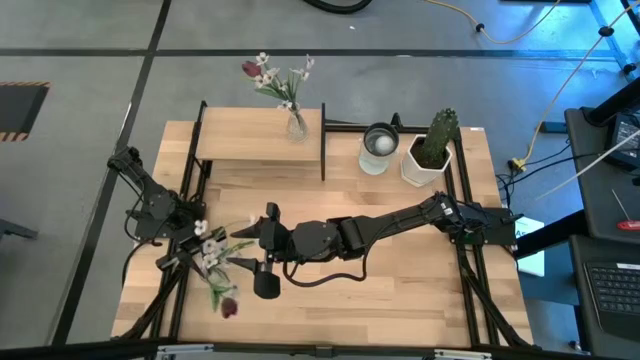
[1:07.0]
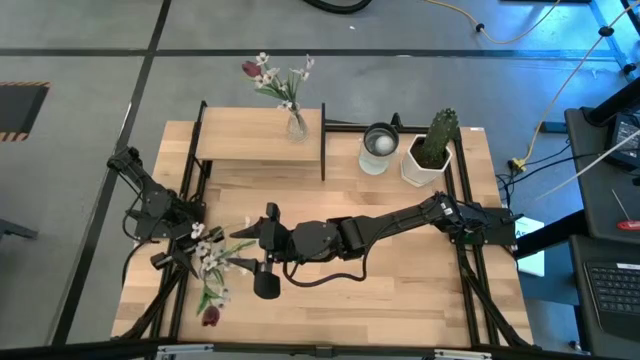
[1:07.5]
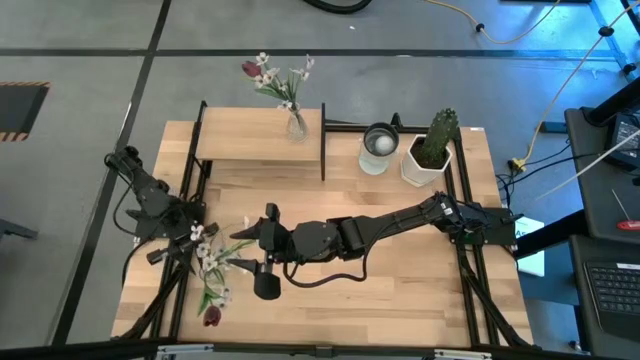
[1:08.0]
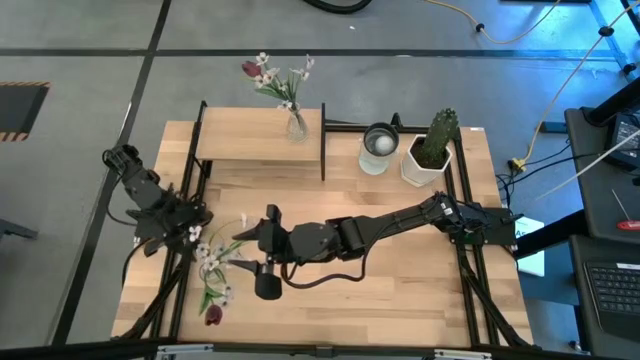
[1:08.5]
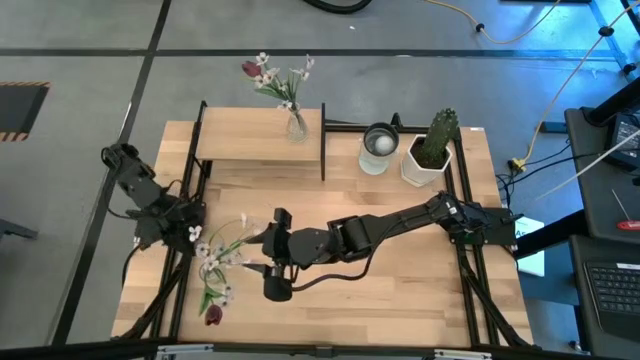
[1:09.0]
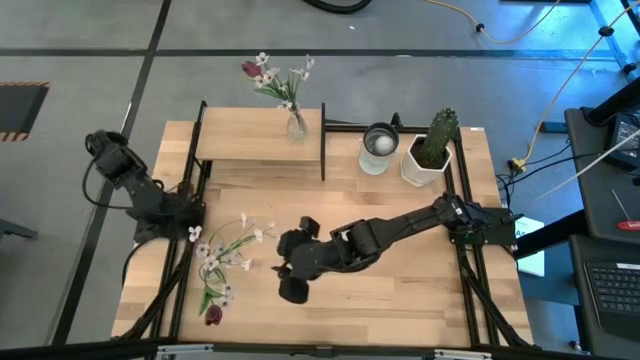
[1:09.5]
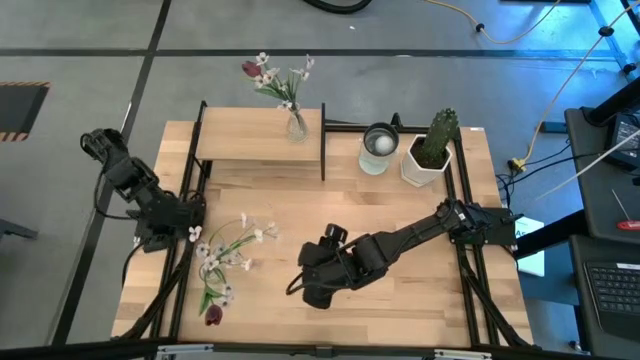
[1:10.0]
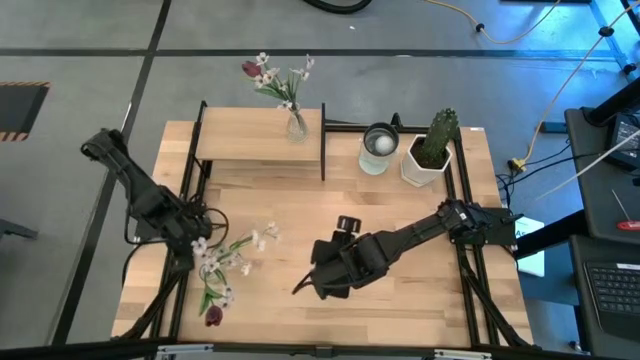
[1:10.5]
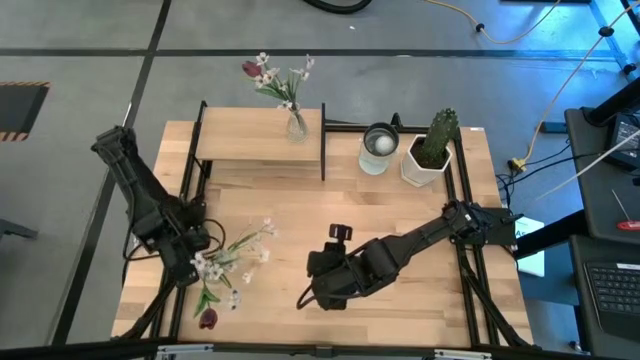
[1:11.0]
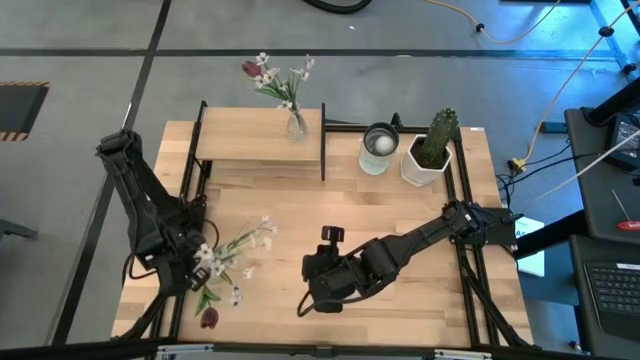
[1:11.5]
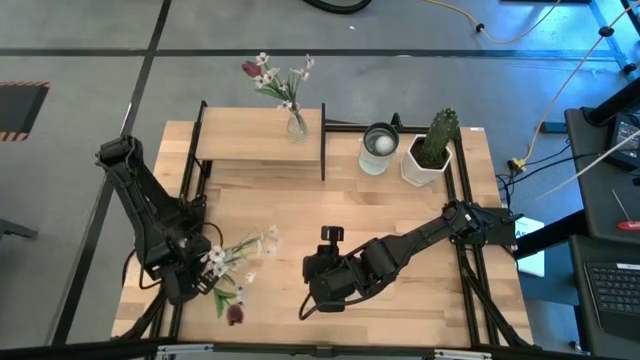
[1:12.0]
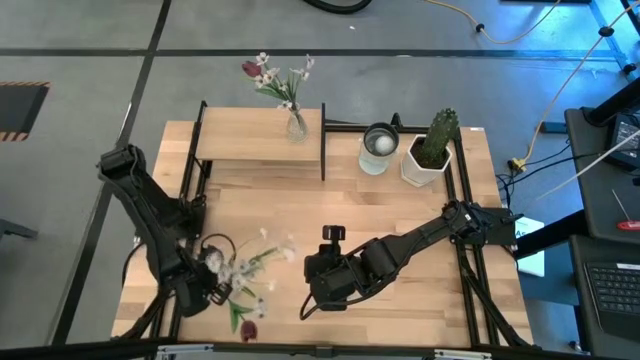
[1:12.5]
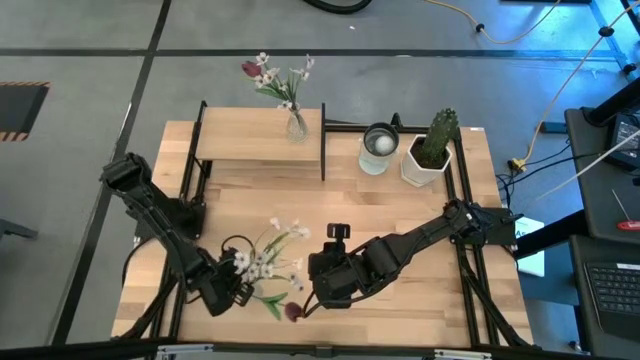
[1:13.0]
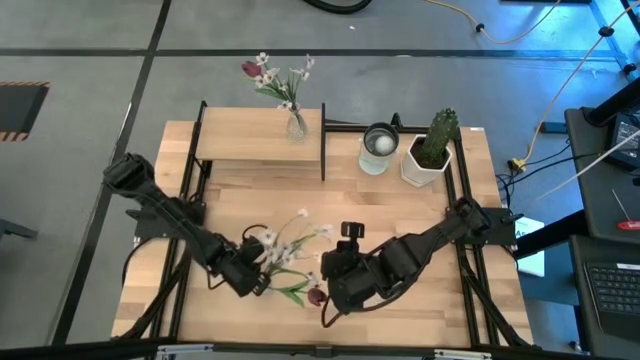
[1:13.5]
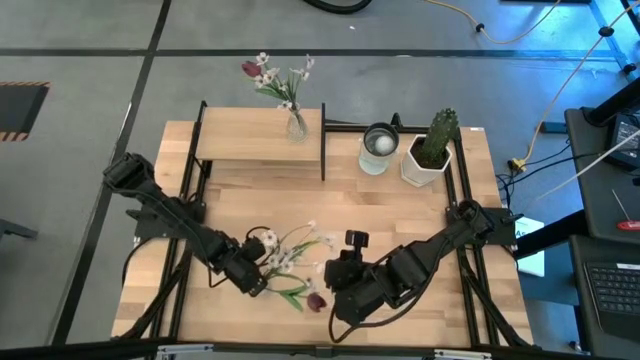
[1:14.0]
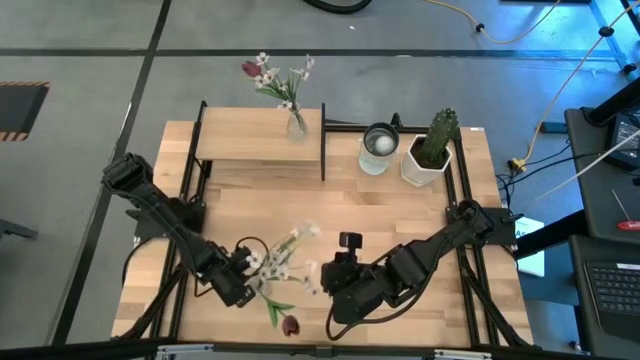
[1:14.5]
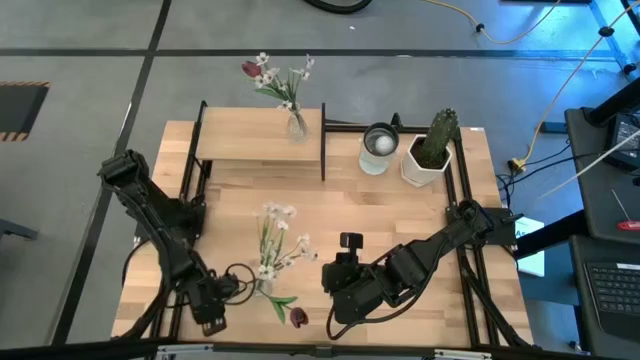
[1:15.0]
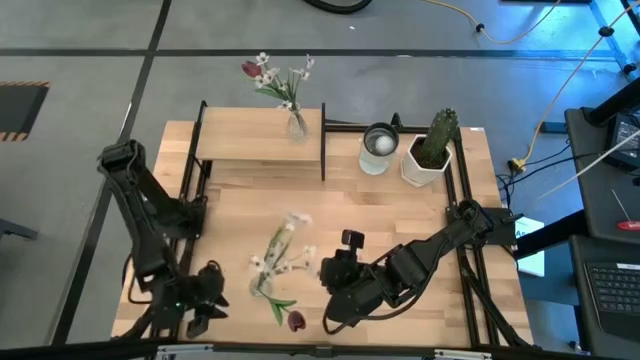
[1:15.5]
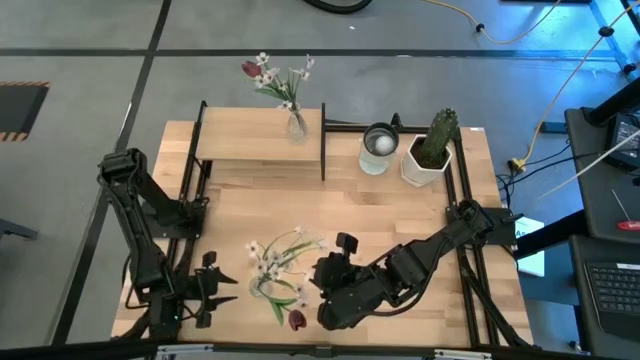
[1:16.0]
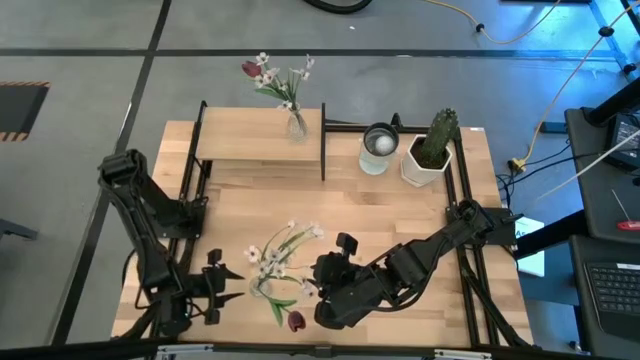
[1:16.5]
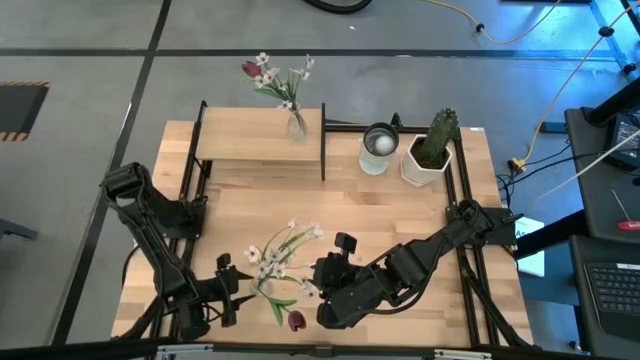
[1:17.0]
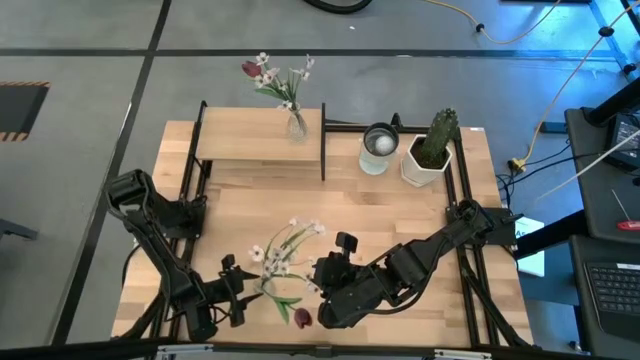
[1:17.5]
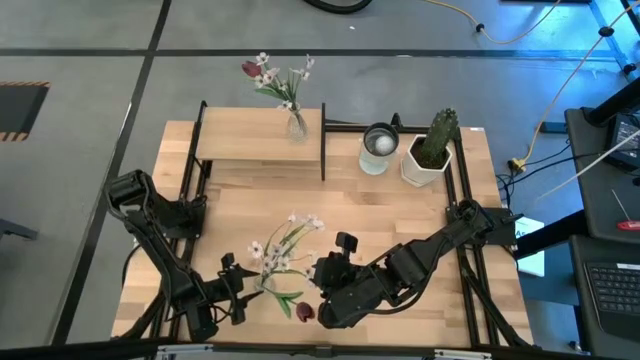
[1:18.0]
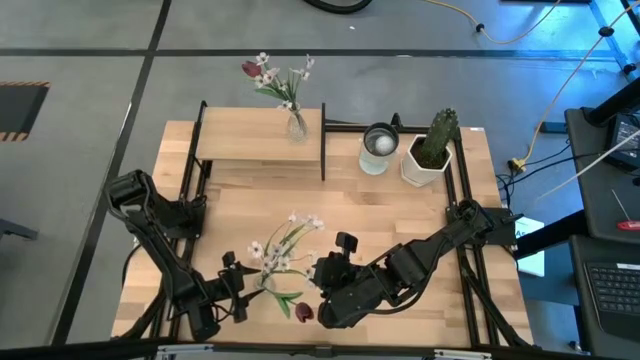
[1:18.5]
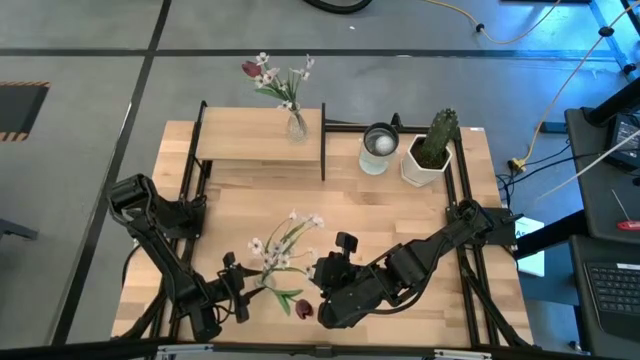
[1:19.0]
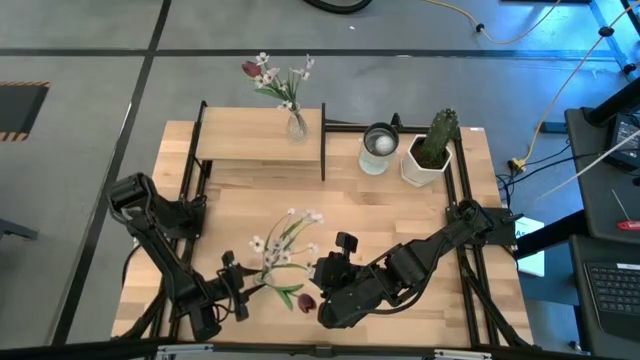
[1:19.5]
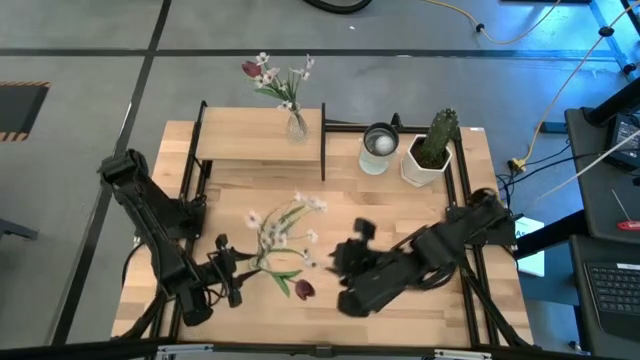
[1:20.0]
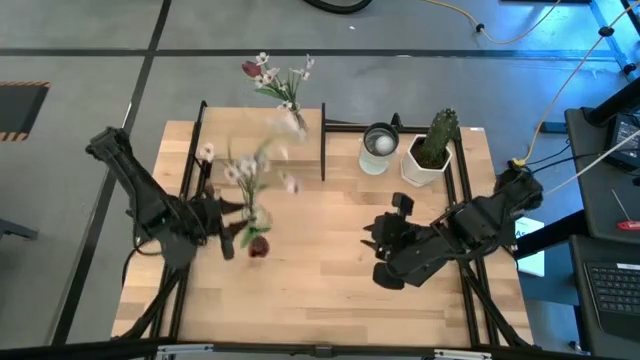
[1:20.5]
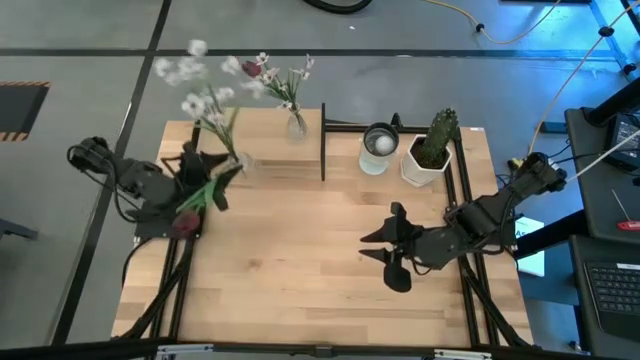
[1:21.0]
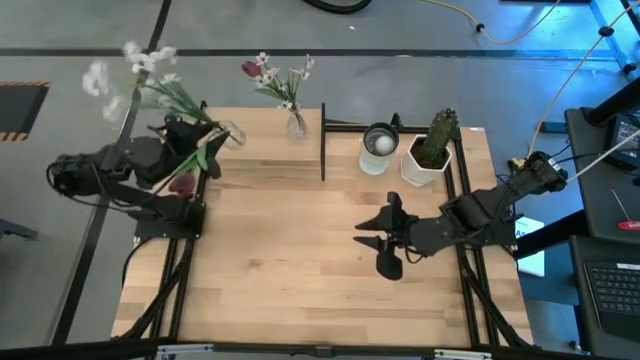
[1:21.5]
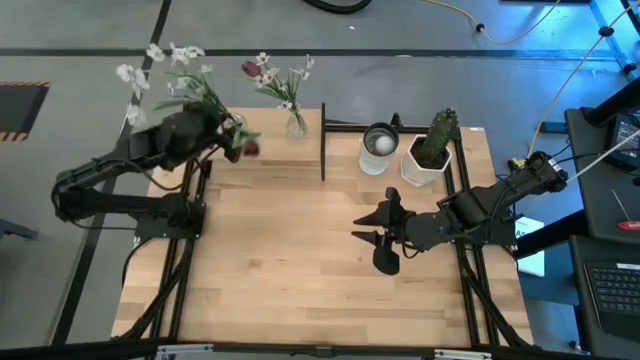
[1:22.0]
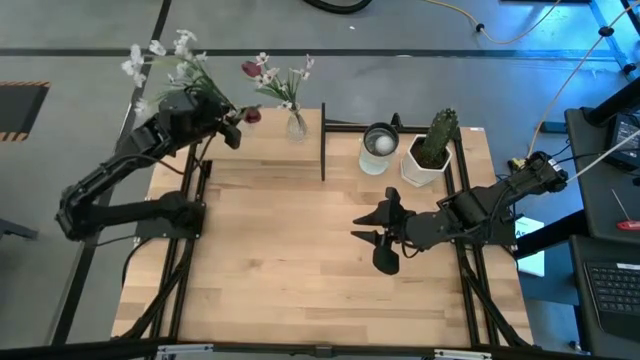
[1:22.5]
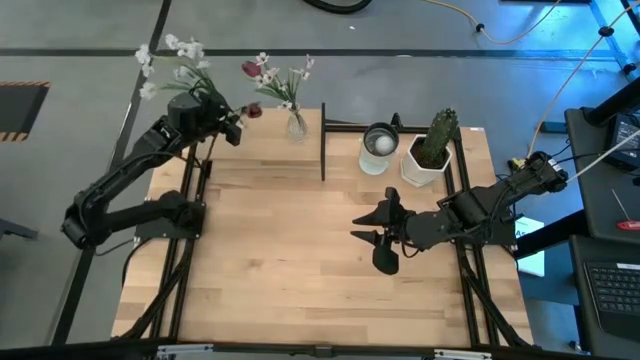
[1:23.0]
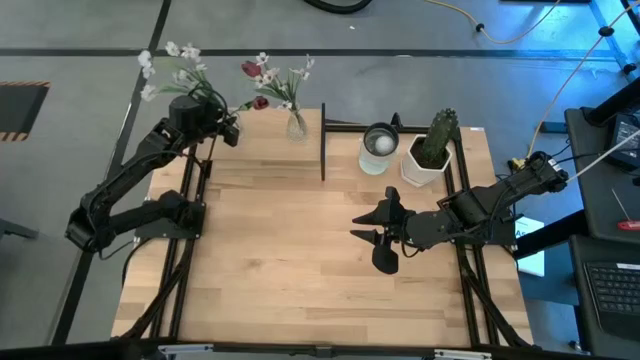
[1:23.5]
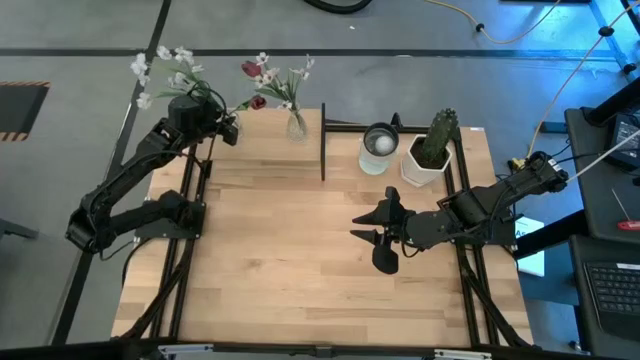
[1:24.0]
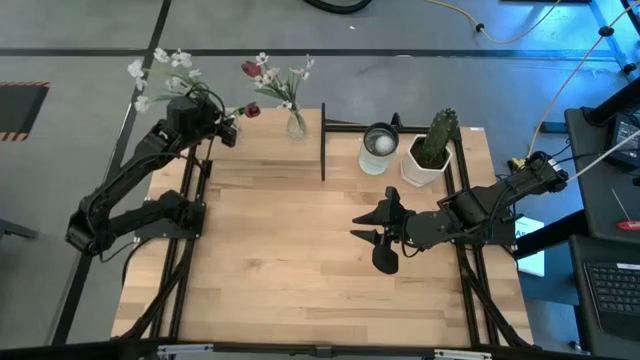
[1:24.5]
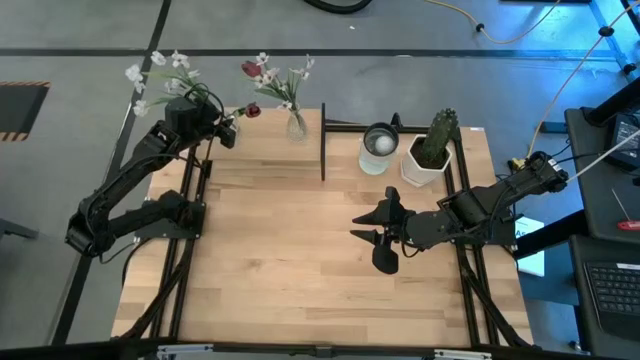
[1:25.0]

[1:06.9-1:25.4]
Task: Pick and place flowers into a vace then onto a shelf
Put the transparent vase with flowers on the shelf

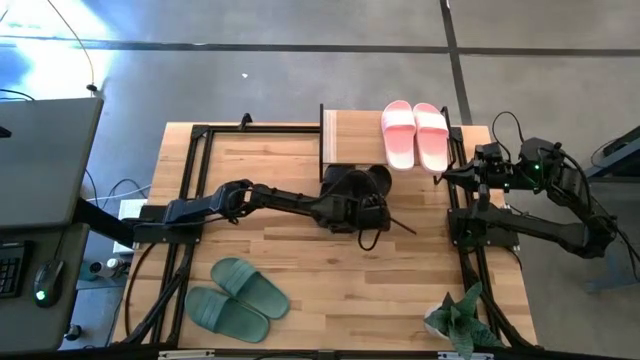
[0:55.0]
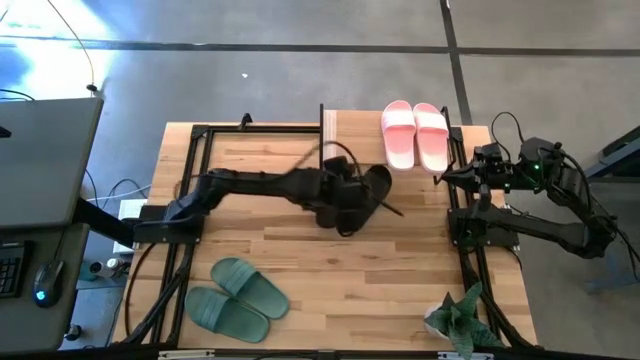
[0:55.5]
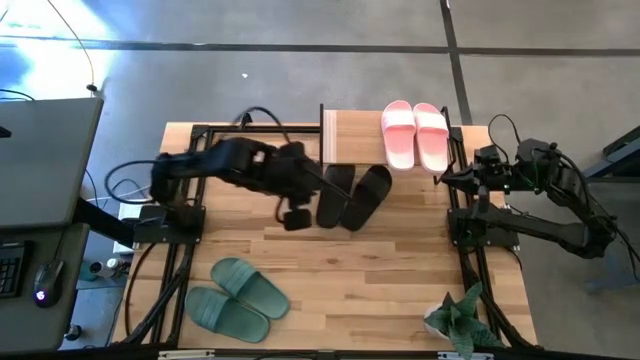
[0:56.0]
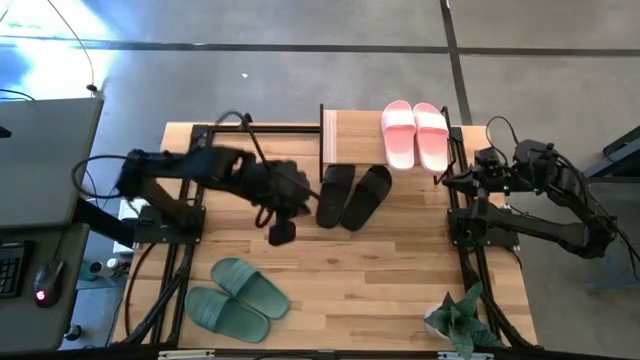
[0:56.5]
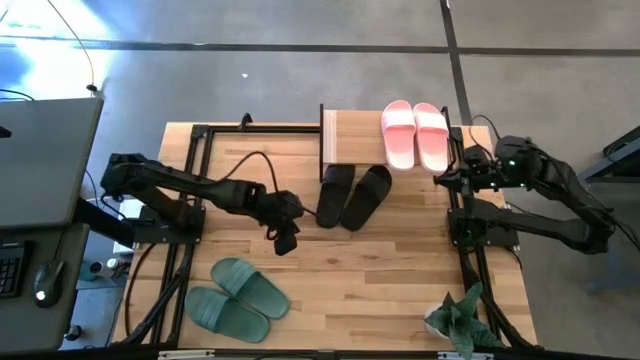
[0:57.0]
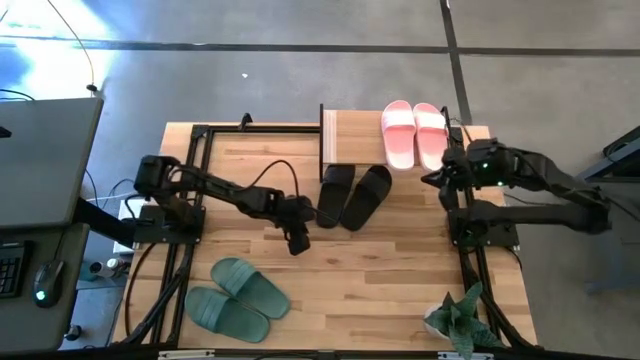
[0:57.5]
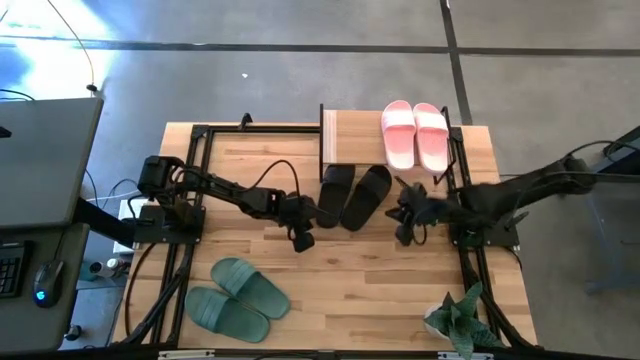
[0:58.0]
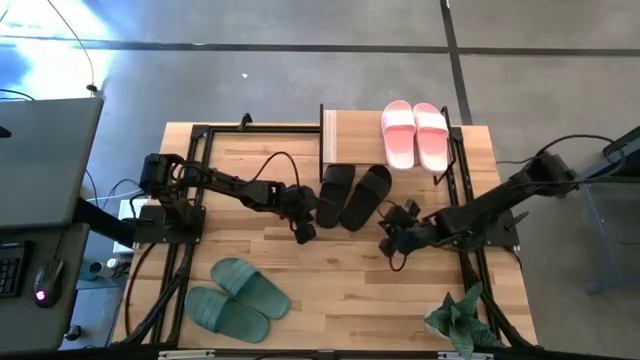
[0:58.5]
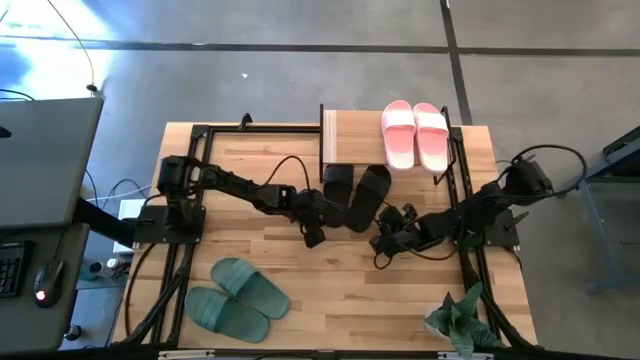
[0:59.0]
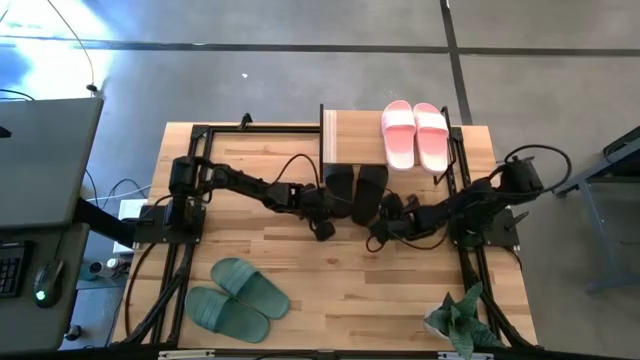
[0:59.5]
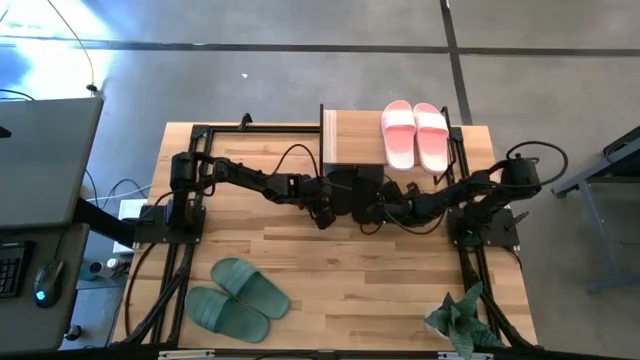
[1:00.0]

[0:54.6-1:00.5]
Task: Pick and place slides into the shelf
Adjust the black slides
